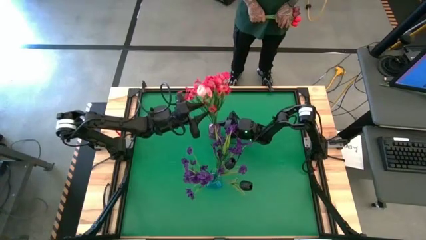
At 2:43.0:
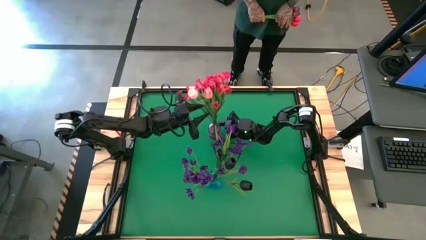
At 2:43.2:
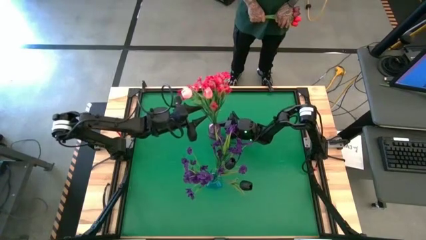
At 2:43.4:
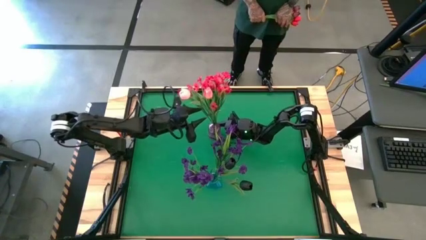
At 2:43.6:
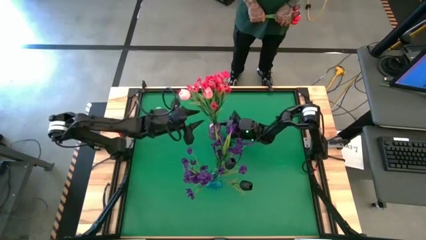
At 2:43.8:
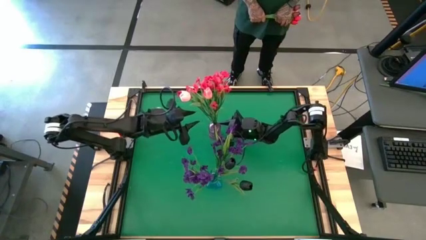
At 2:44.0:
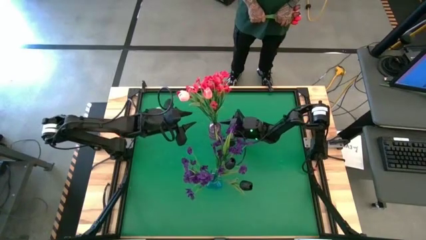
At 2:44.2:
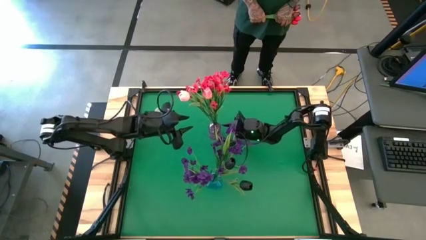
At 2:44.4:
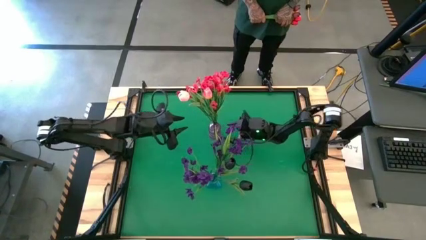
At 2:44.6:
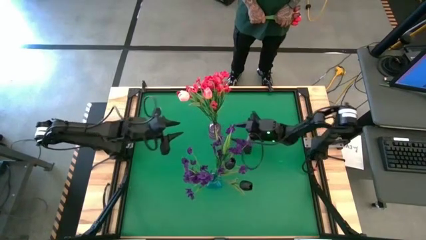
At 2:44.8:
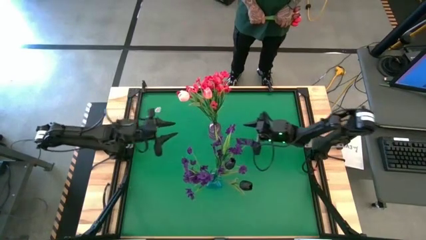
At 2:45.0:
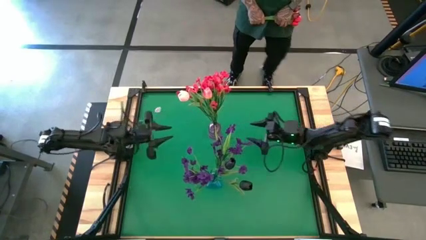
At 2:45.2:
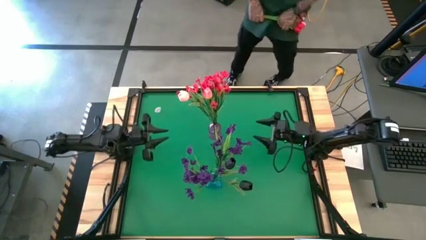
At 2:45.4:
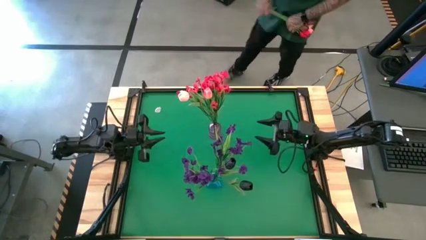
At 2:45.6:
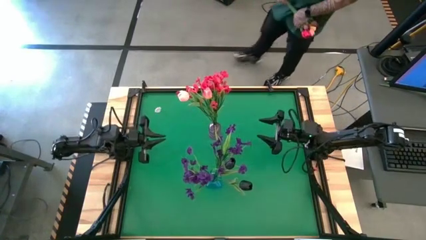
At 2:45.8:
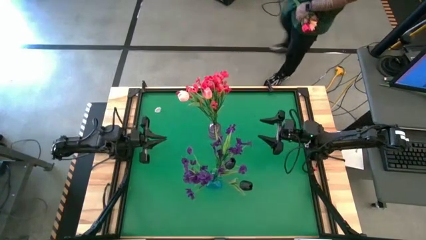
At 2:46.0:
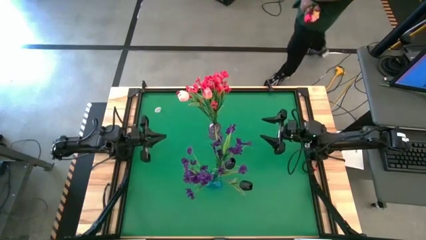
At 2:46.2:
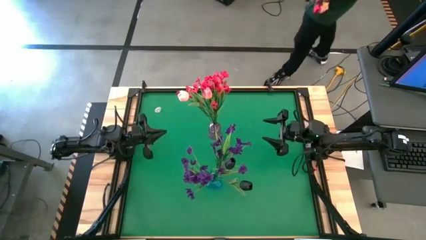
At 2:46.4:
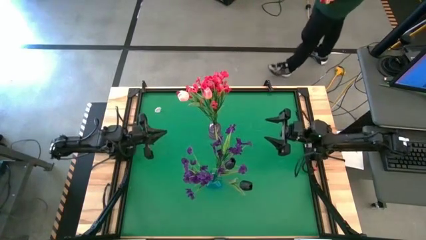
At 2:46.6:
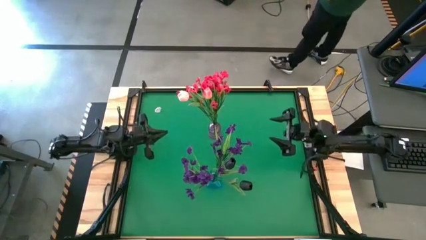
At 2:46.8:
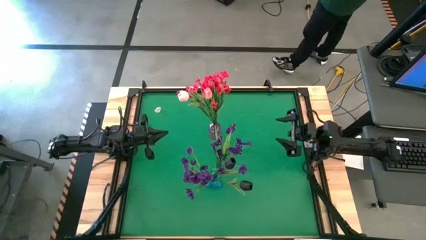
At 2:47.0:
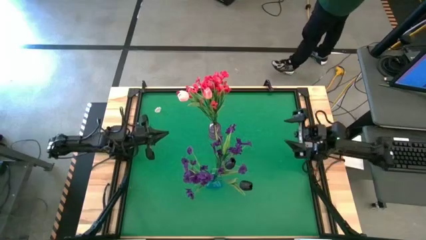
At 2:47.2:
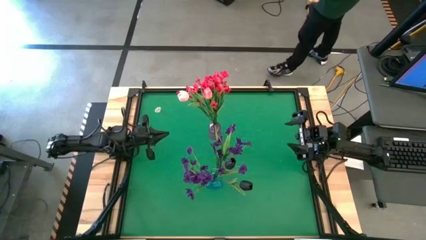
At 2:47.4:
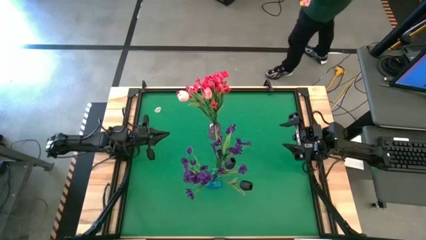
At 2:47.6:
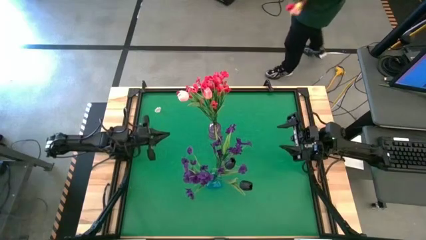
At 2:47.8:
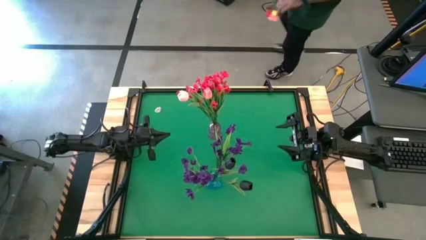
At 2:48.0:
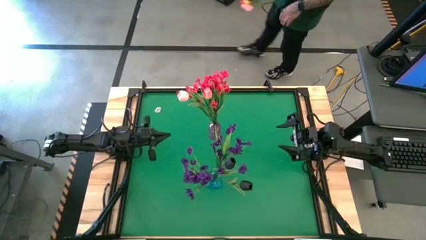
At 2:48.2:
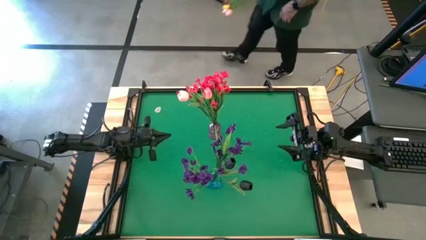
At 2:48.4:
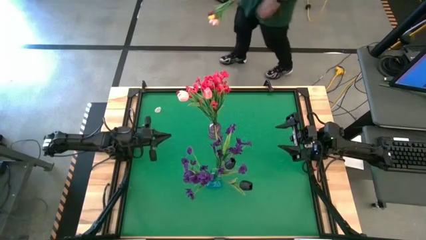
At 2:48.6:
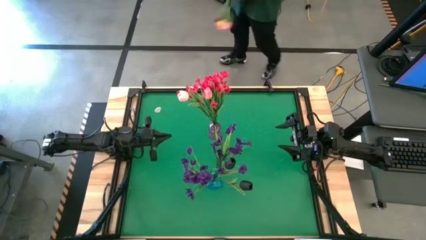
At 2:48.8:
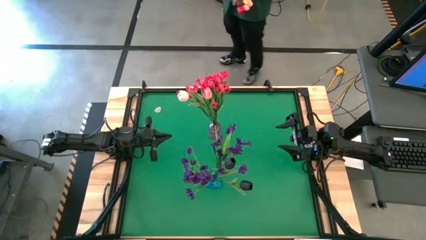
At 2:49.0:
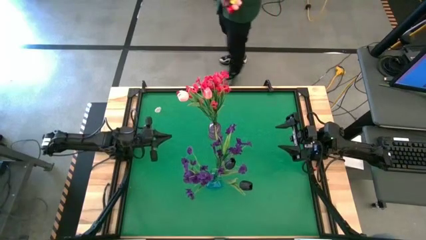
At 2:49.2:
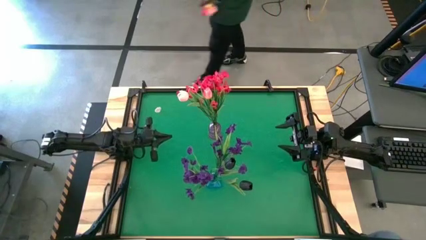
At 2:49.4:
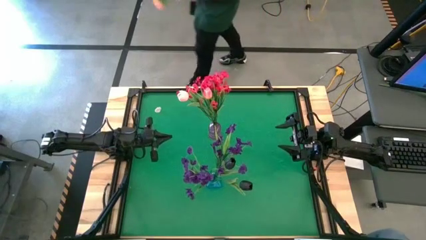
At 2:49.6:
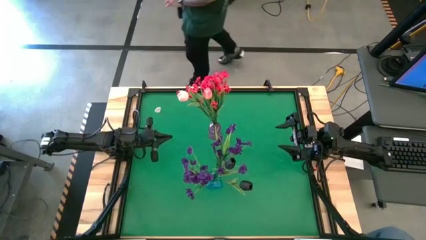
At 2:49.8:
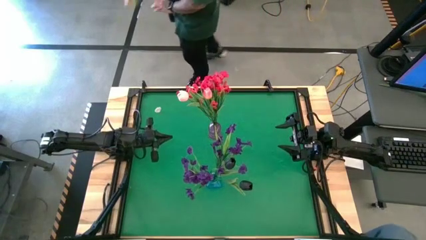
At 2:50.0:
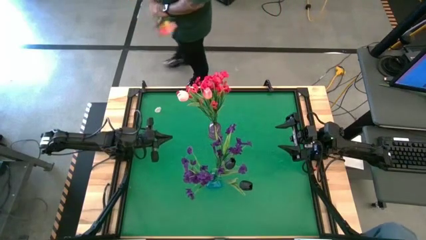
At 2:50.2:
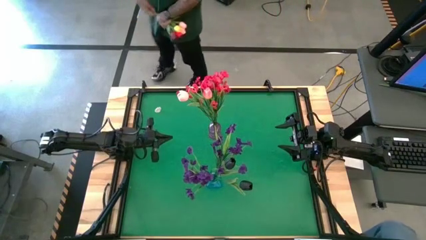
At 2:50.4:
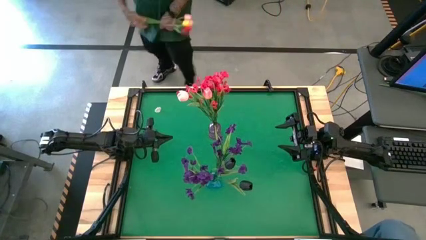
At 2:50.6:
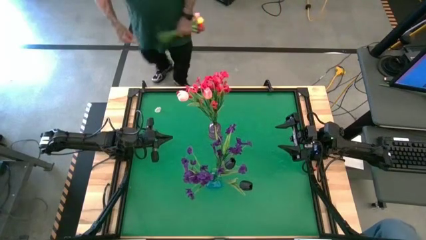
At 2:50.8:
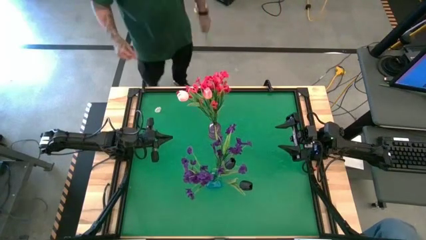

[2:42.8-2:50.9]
Task: Sort flowers into vase by color
Return to Home Position

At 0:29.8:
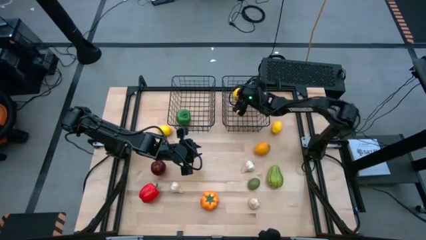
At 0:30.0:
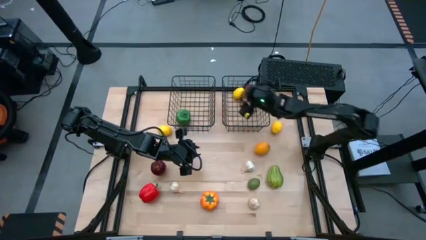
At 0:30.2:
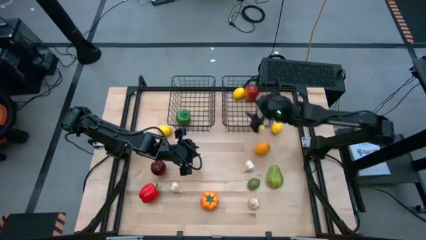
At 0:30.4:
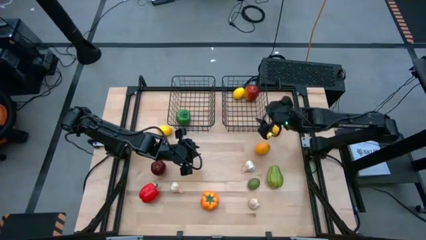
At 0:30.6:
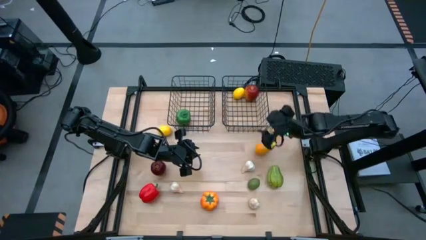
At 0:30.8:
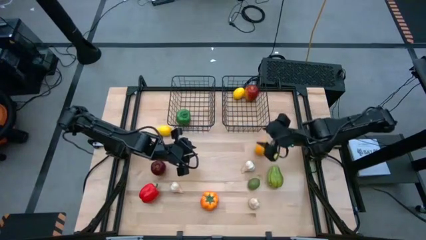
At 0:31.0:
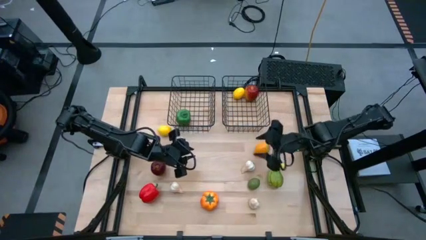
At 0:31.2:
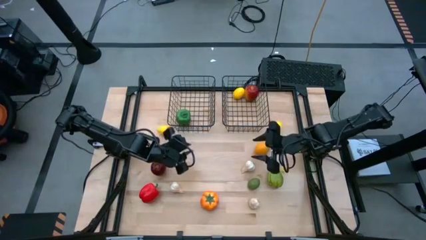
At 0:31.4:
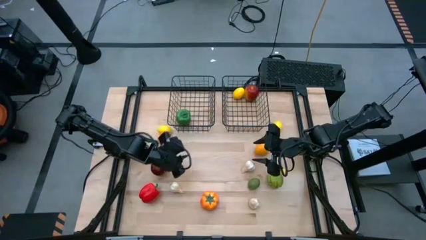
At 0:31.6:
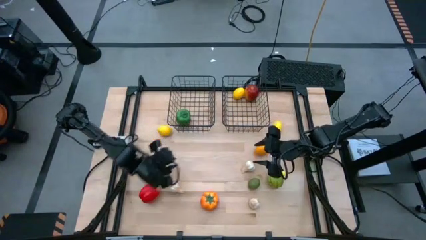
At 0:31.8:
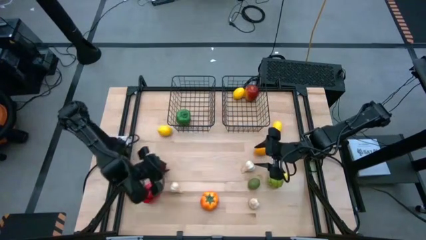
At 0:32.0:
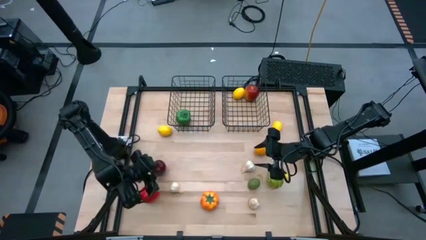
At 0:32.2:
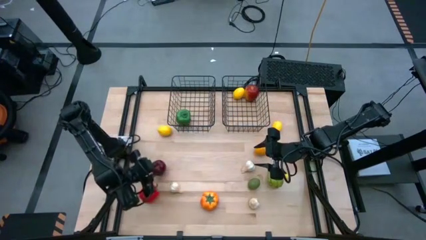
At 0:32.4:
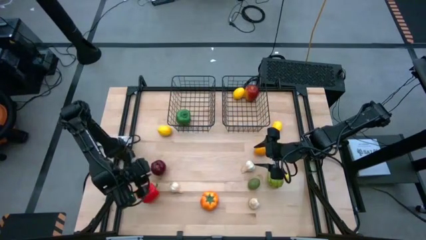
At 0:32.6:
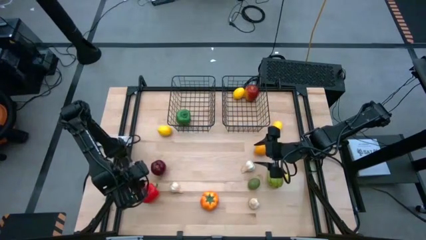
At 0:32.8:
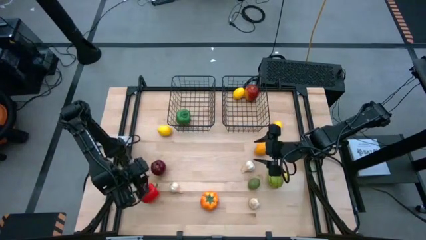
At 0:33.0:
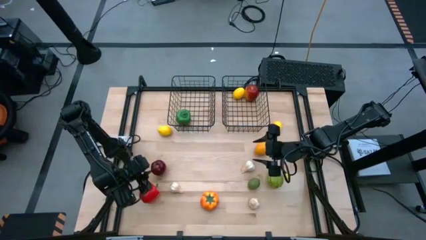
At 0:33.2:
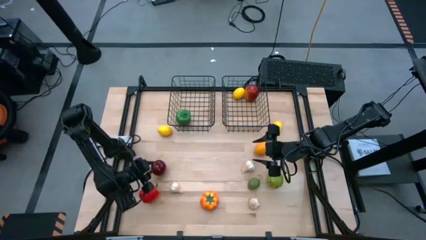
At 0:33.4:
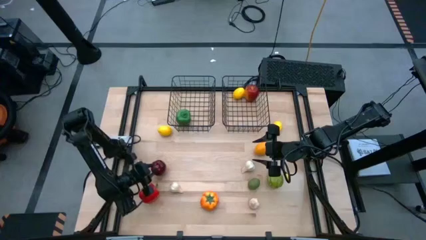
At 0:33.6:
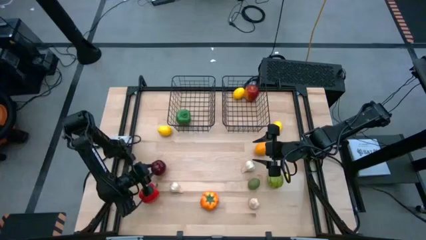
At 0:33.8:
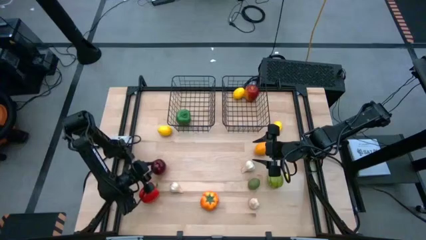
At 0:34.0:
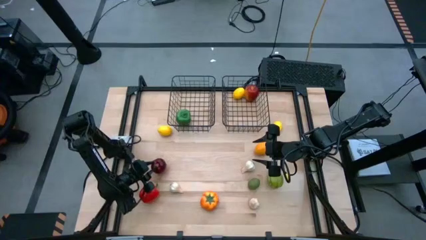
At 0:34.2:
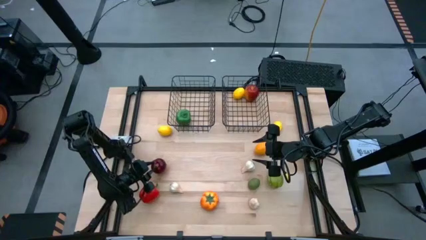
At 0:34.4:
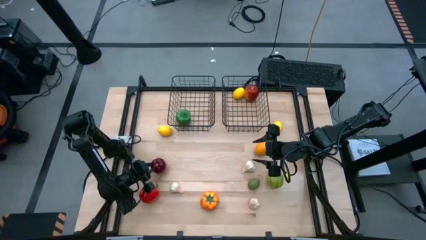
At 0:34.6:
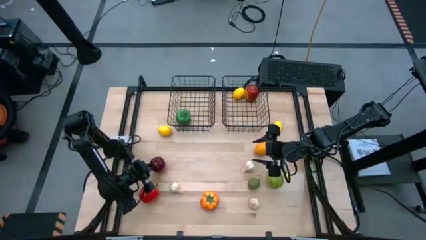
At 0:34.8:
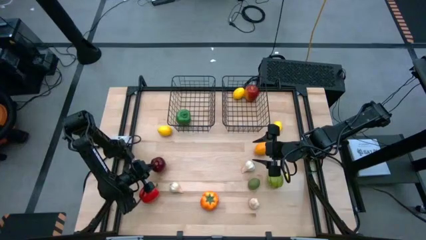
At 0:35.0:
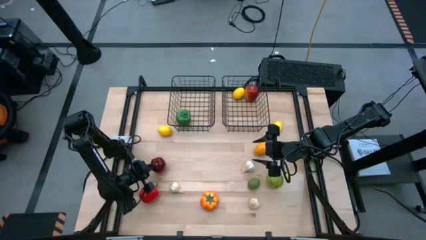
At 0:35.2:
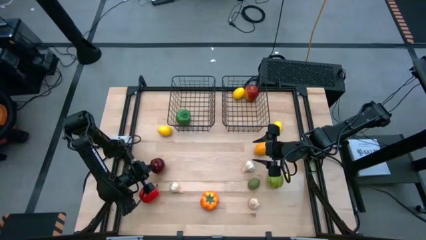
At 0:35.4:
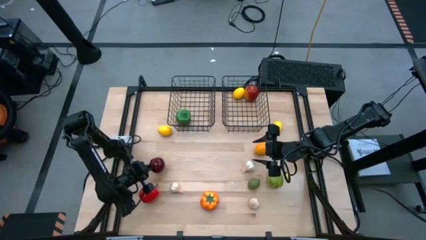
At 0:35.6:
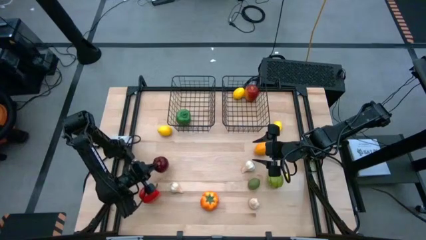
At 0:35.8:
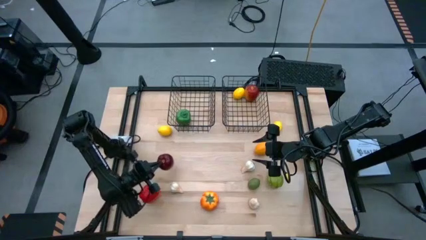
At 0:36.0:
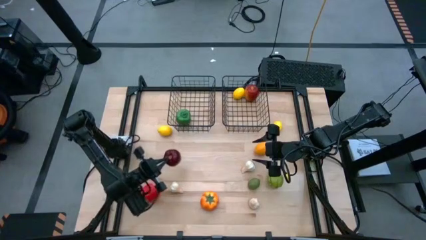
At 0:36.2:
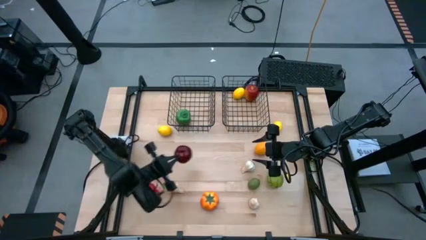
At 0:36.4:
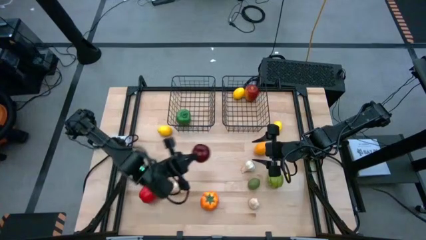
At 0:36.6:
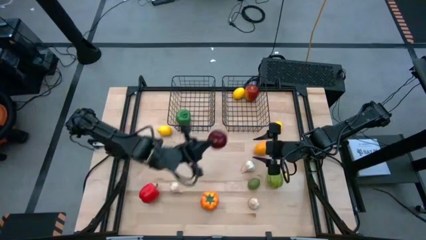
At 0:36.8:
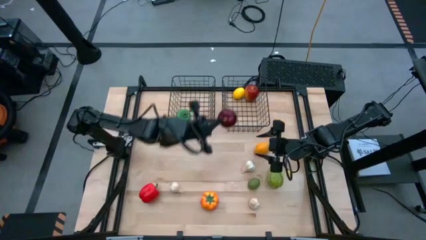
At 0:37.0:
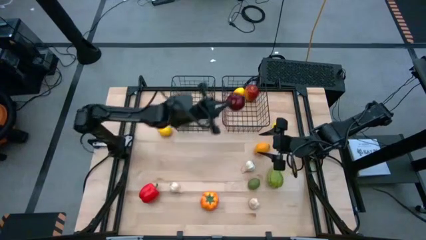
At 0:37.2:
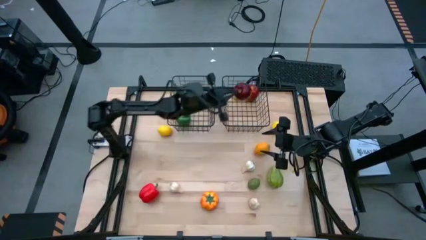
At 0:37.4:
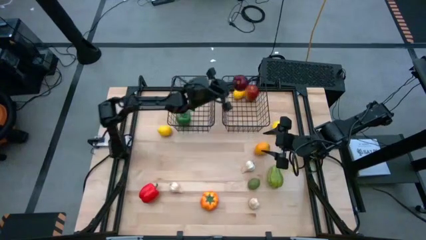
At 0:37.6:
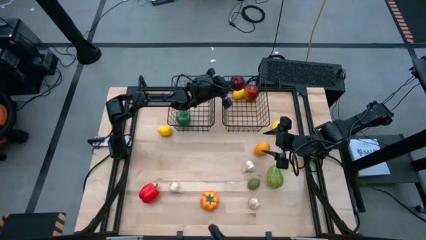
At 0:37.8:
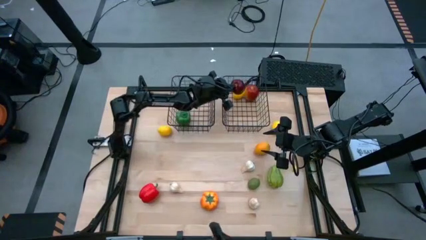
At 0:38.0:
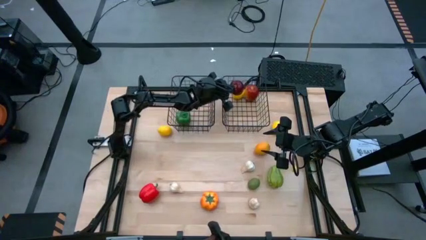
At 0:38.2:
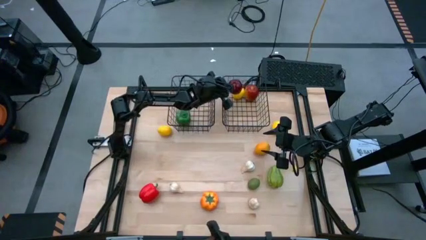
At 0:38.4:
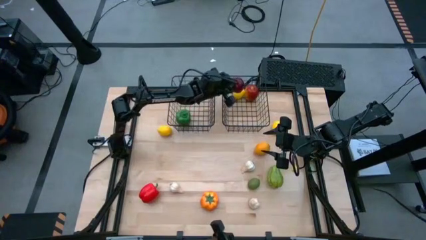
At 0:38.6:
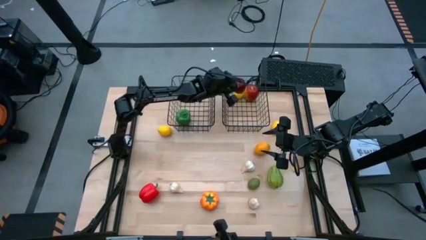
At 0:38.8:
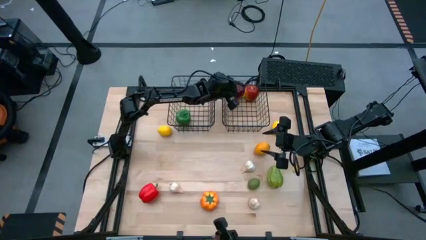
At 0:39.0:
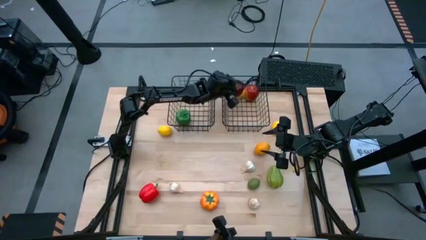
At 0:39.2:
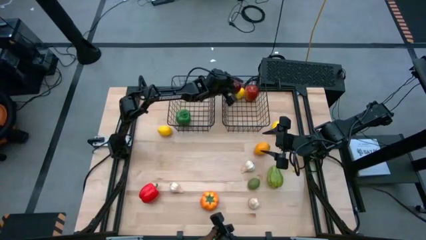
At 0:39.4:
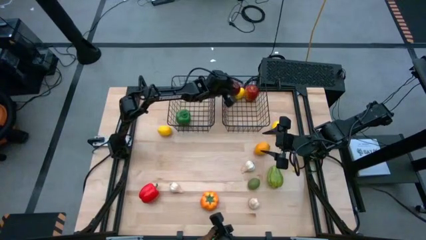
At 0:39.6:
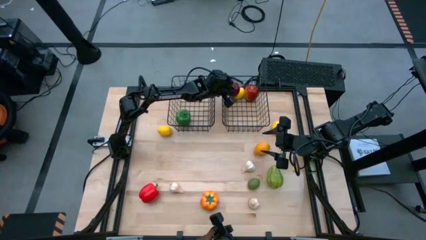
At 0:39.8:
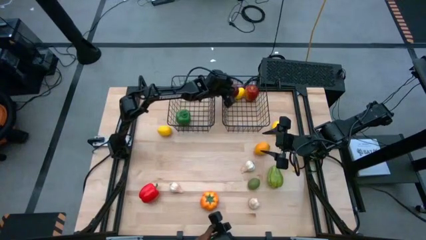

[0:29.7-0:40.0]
Task: Sort produce into baskets
Put the dark red apple into the right wire basket
